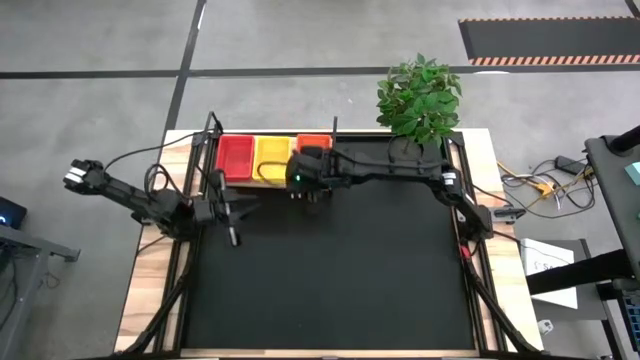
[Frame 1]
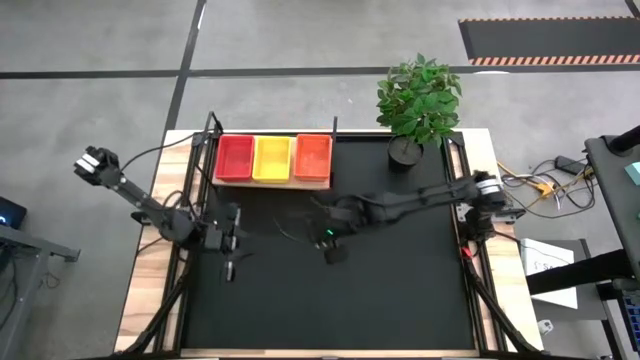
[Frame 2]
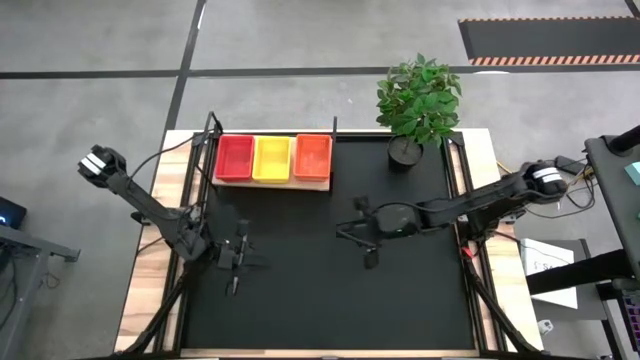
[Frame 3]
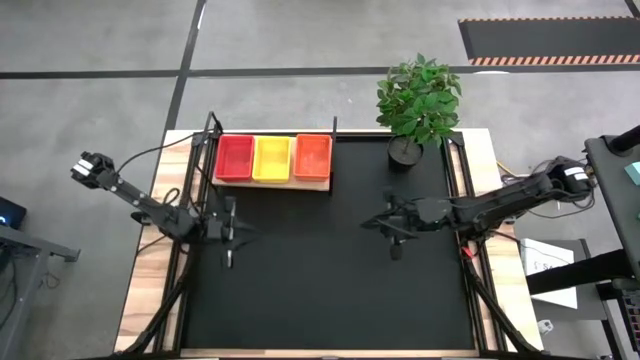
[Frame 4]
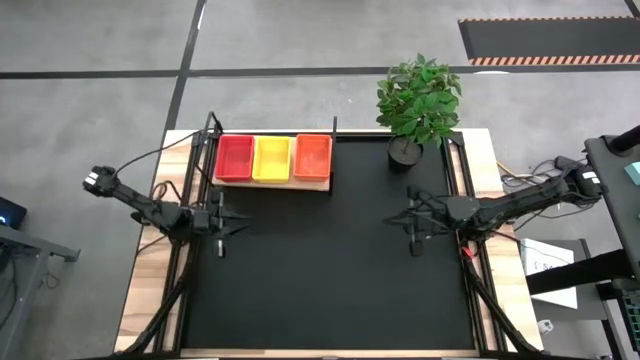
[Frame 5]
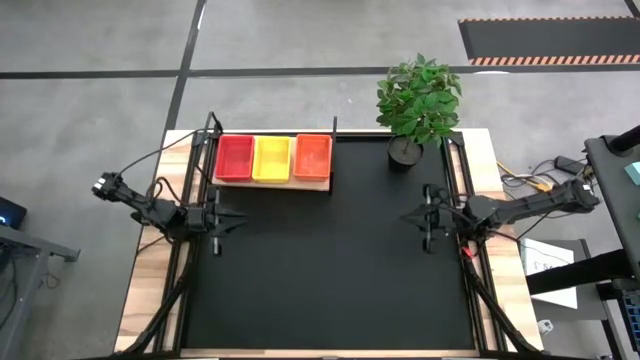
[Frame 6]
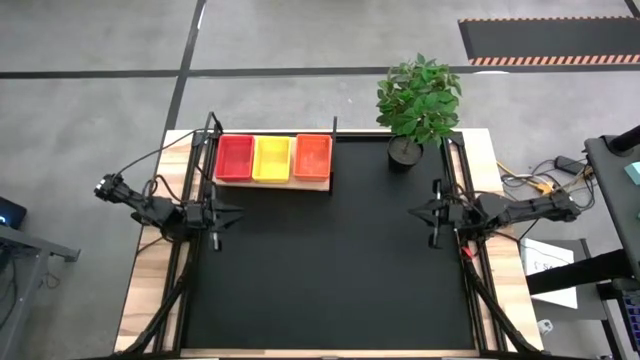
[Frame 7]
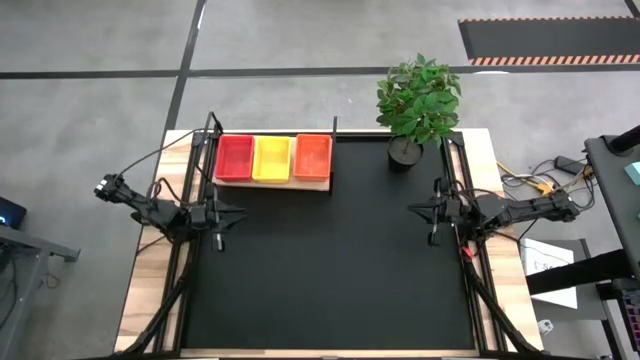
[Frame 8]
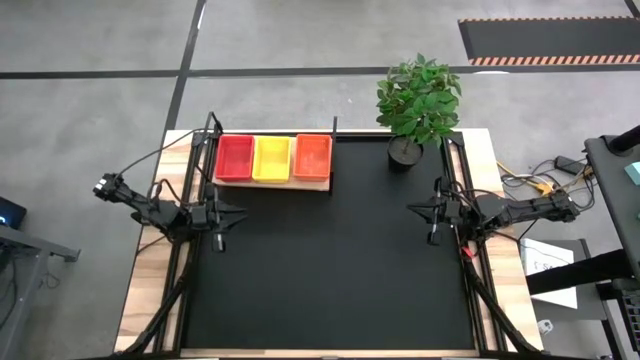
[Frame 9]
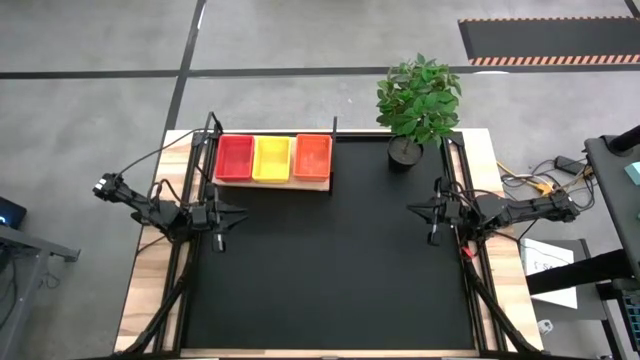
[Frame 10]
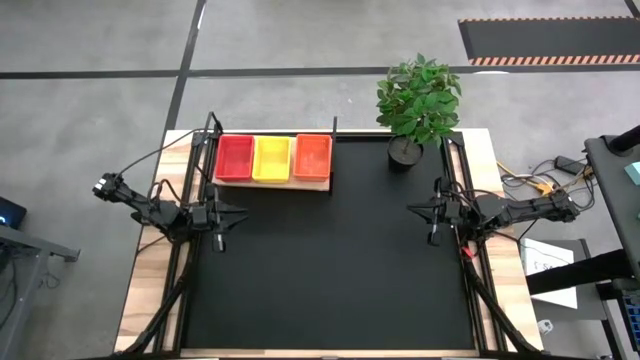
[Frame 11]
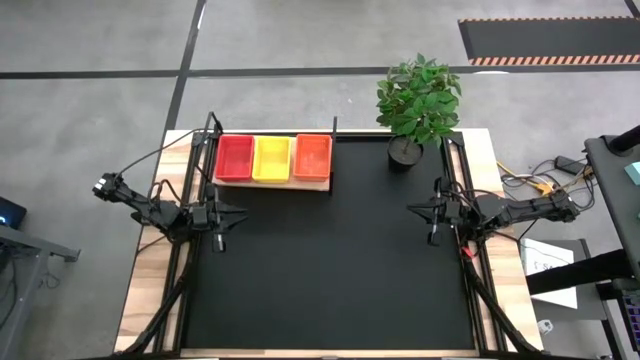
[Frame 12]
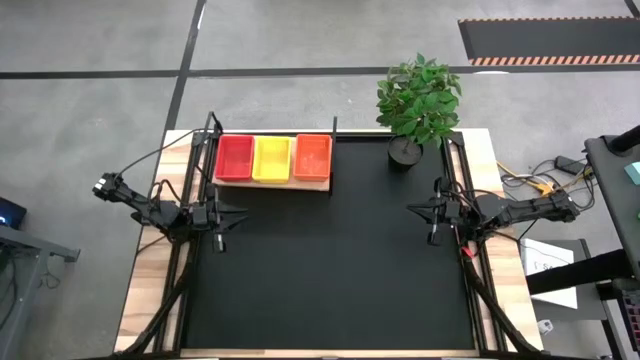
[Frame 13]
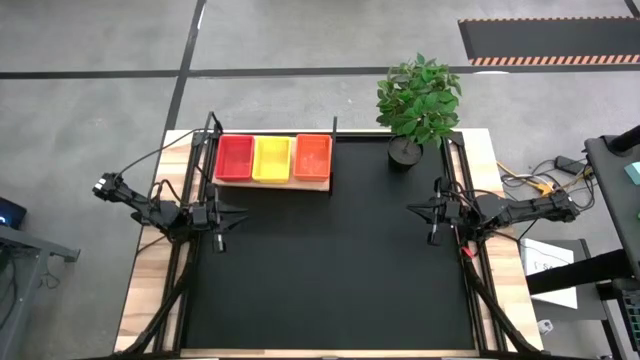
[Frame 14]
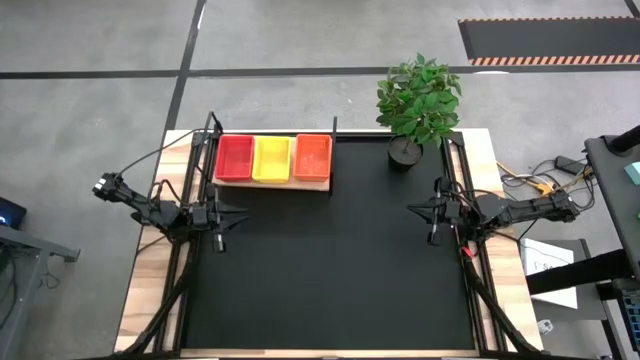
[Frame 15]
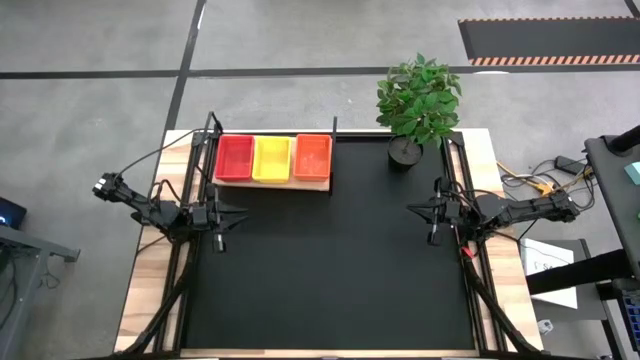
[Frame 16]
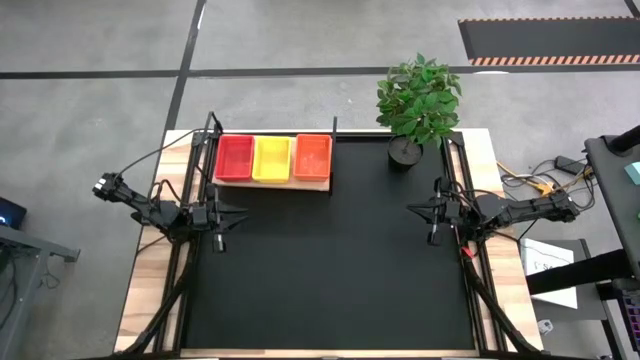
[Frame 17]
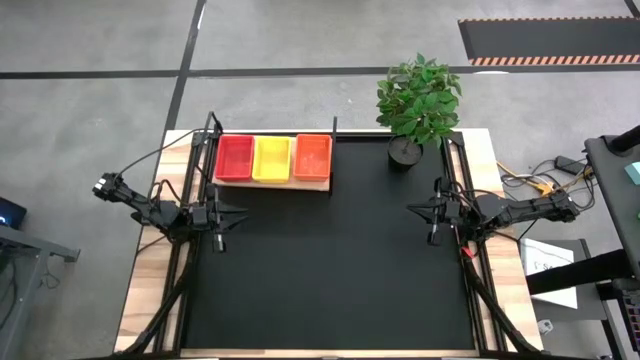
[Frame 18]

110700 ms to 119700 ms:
Task: Stack baskets on shelf by color
Return to Home Position

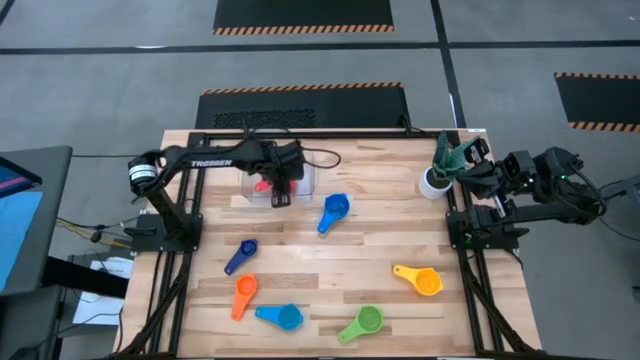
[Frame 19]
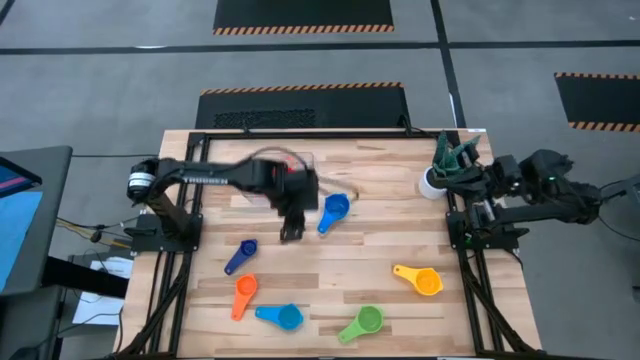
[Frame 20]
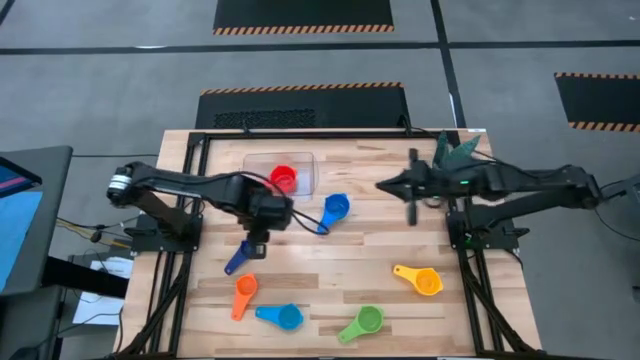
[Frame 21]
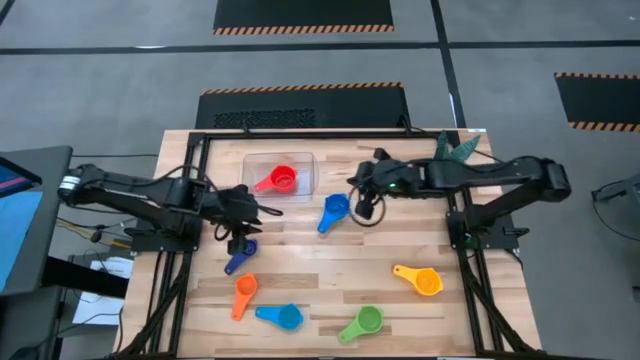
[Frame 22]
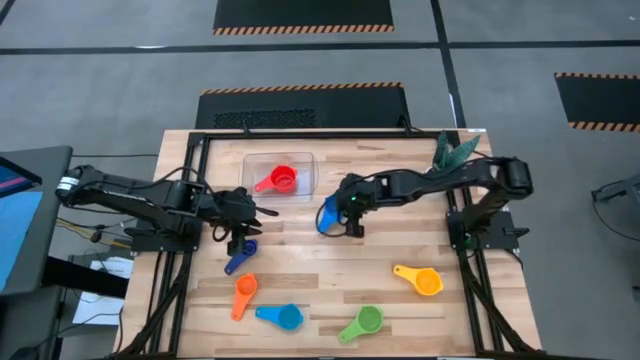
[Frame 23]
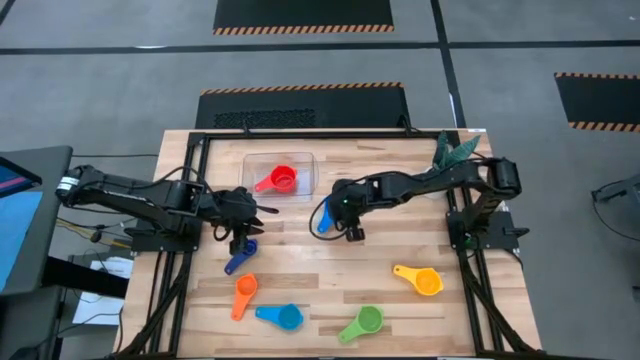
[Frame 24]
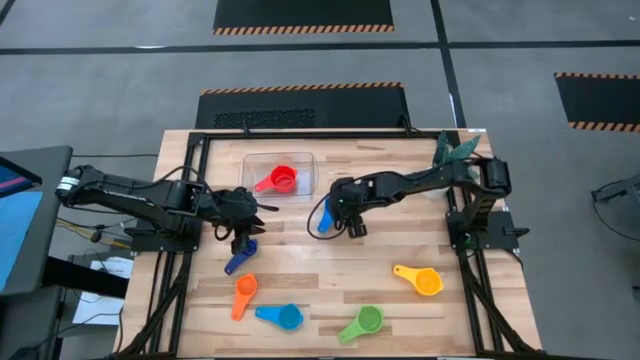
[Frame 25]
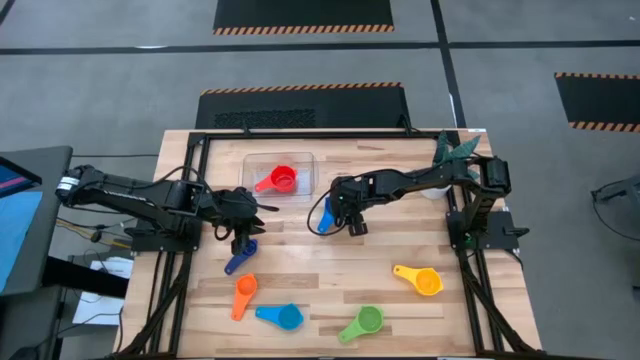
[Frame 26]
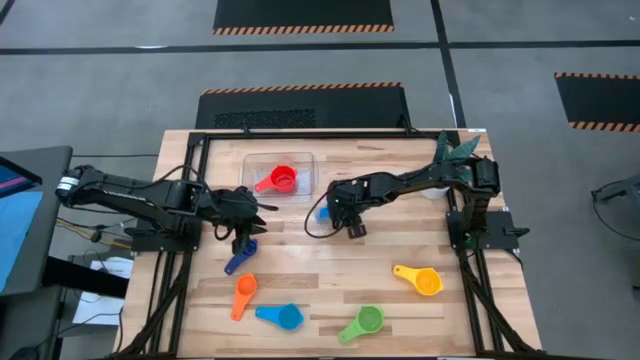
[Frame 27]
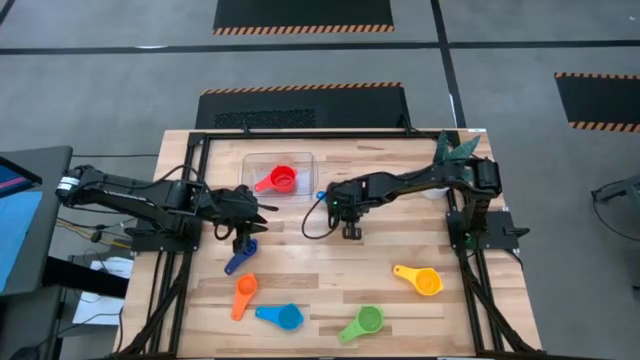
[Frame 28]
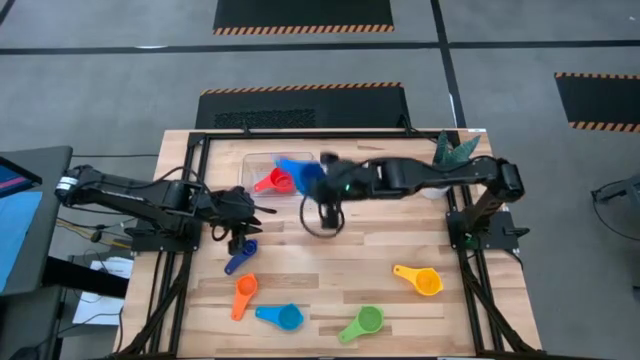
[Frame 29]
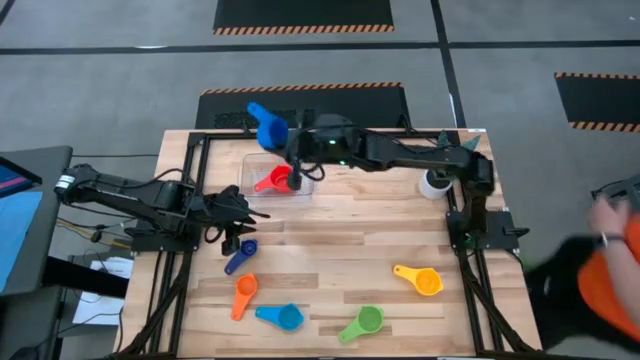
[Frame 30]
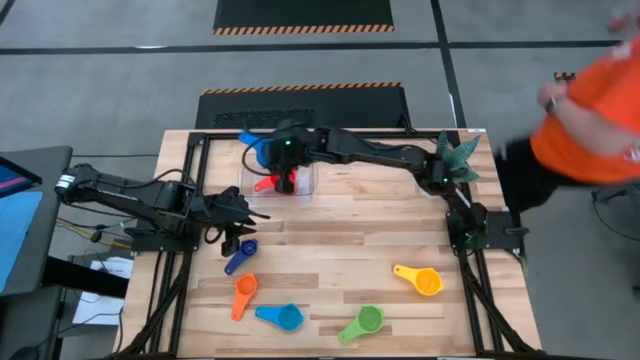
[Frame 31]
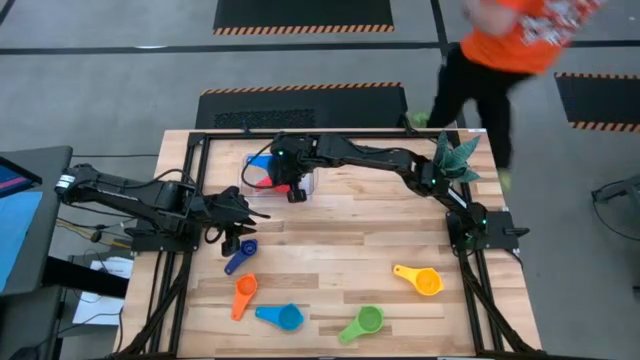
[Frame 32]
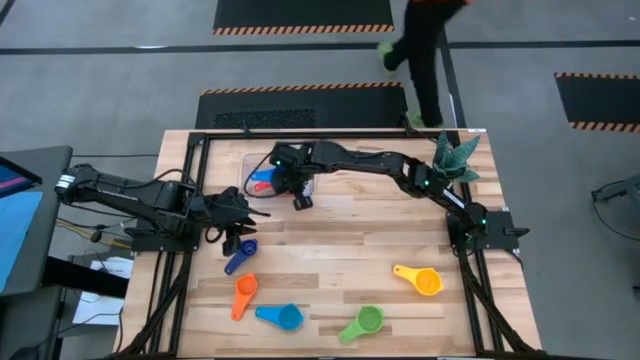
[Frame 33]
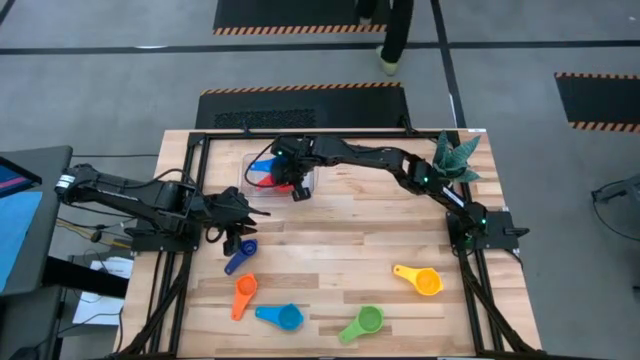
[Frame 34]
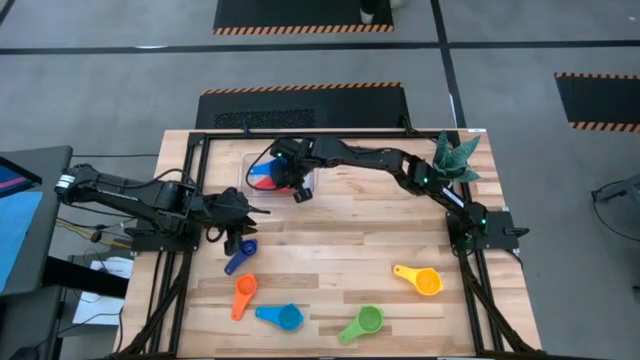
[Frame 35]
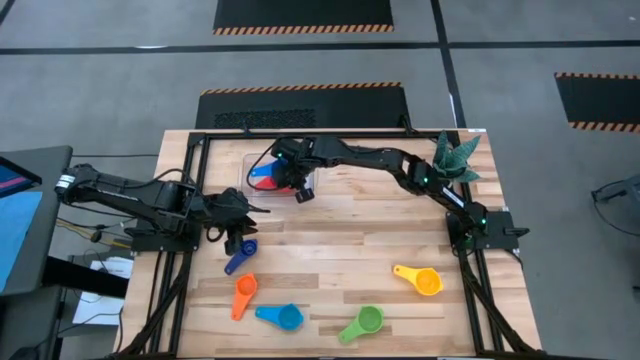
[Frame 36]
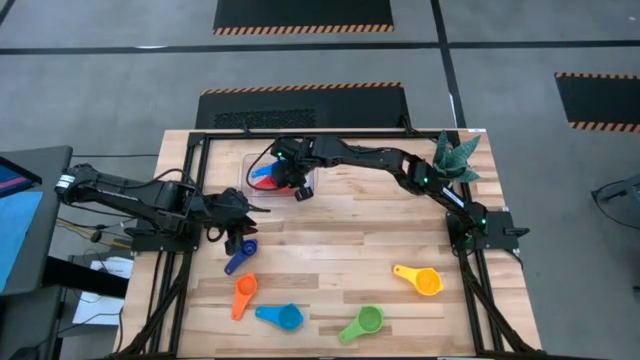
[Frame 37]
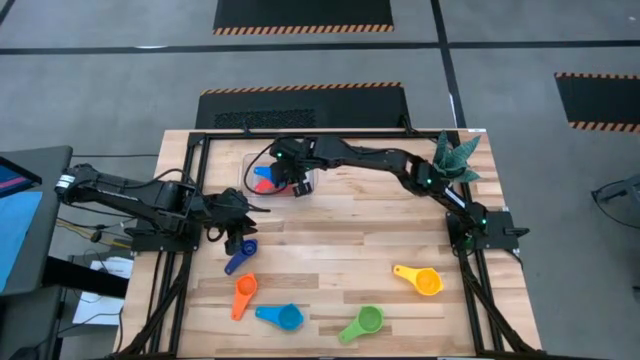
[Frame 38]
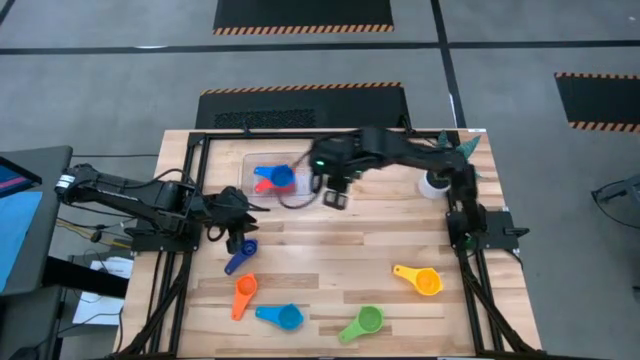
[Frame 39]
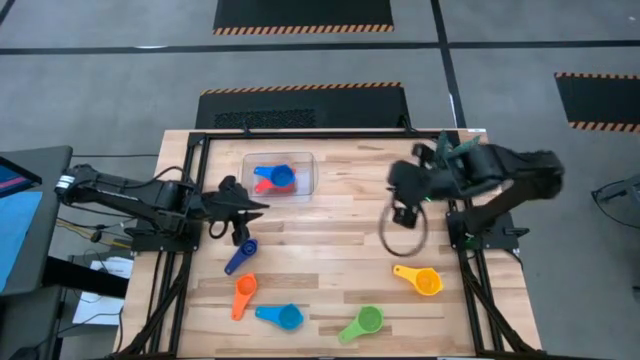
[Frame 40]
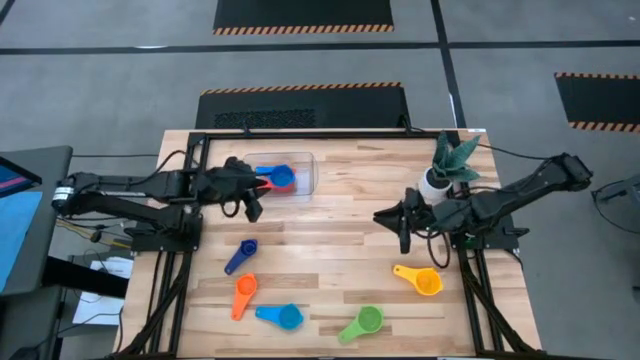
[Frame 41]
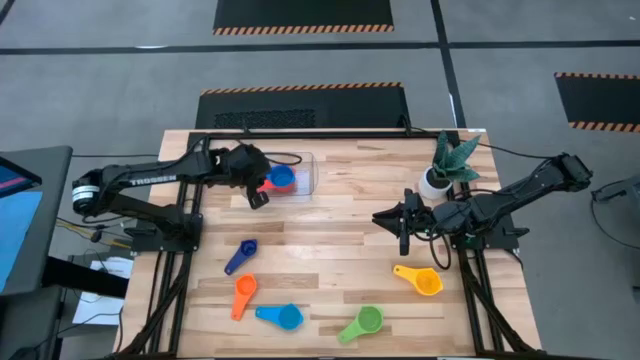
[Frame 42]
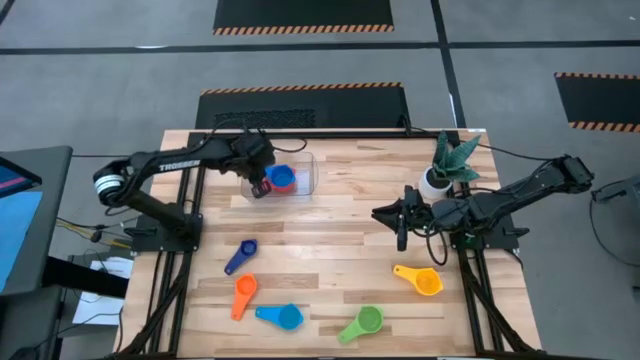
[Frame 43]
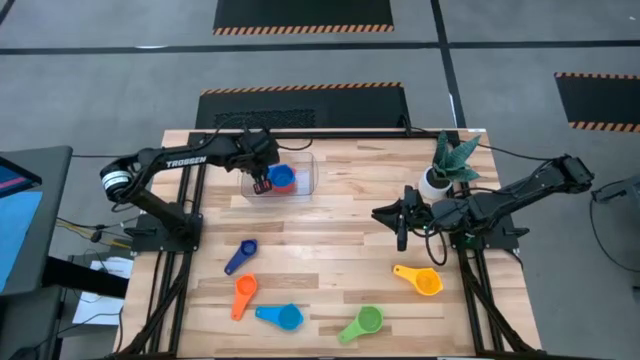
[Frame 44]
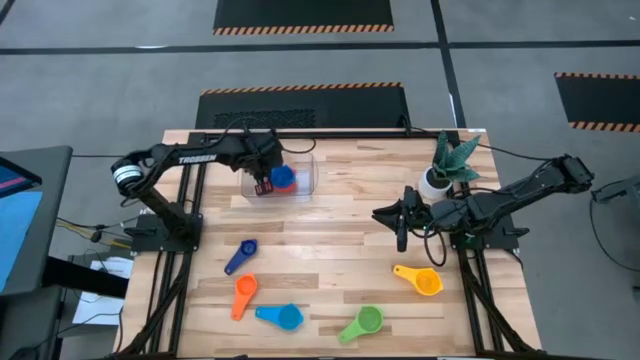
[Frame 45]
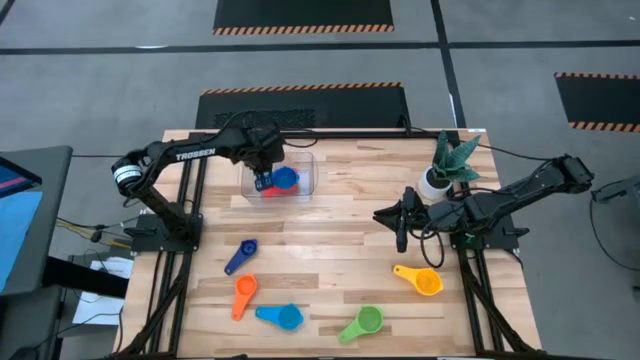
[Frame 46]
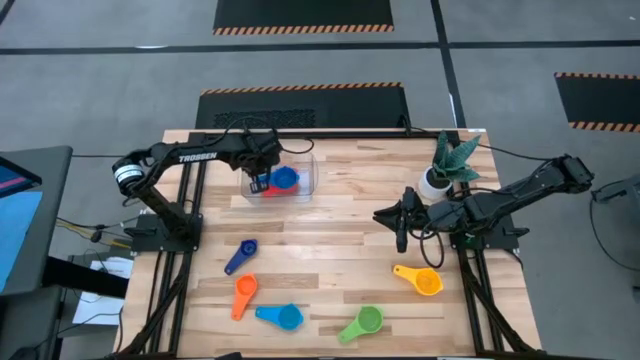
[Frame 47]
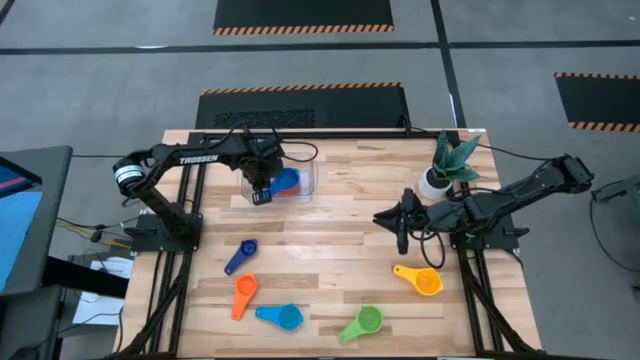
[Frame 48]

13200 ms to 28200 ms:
Task: Nest measuring cups in basket
Stack the dark blue measuring cup into the red measuring cup in the transparent bin
